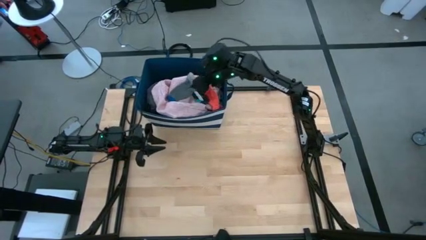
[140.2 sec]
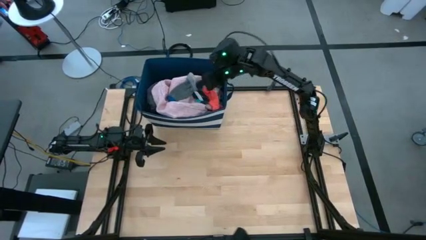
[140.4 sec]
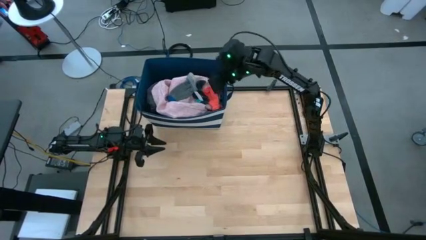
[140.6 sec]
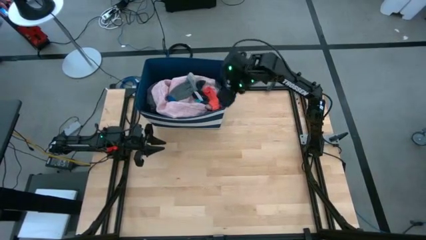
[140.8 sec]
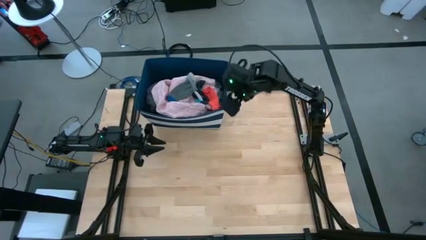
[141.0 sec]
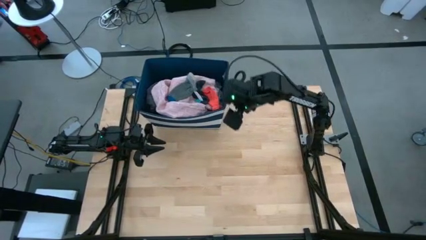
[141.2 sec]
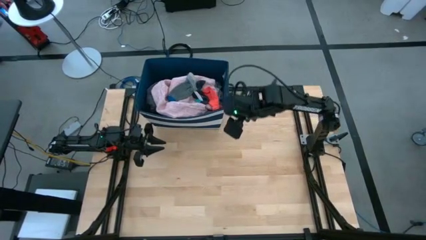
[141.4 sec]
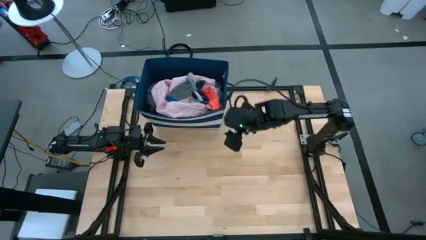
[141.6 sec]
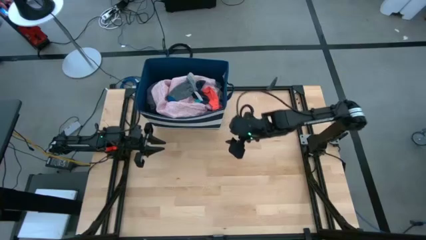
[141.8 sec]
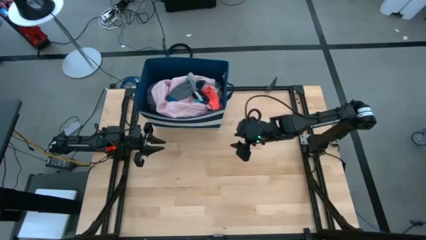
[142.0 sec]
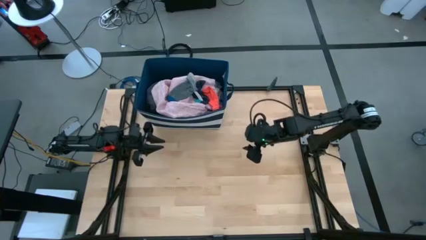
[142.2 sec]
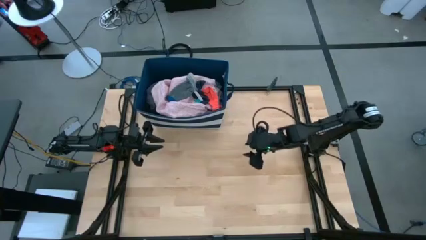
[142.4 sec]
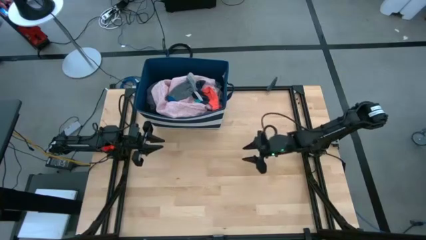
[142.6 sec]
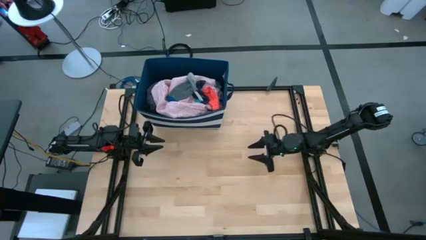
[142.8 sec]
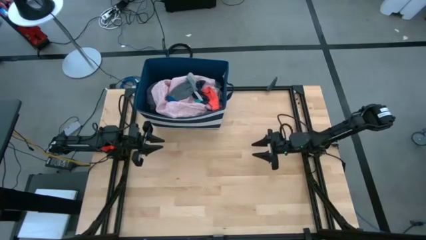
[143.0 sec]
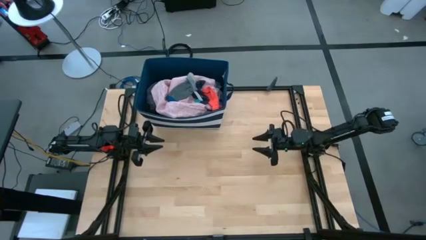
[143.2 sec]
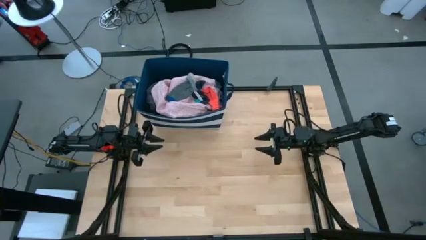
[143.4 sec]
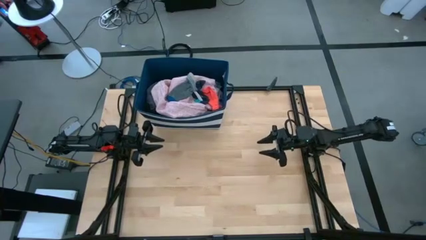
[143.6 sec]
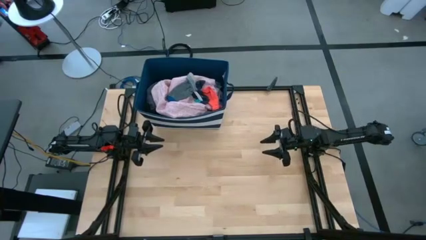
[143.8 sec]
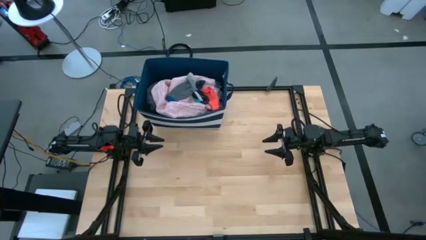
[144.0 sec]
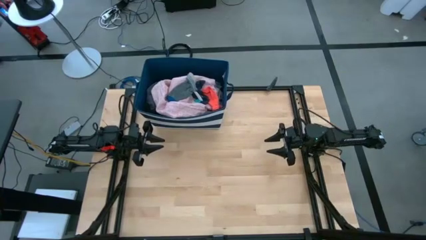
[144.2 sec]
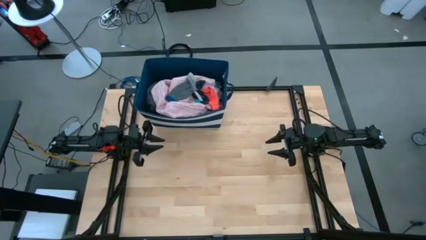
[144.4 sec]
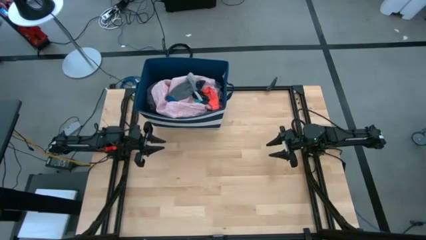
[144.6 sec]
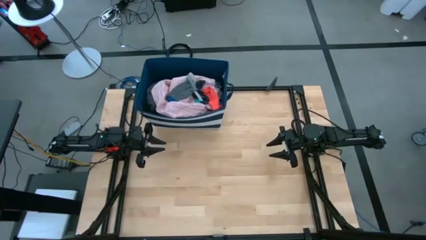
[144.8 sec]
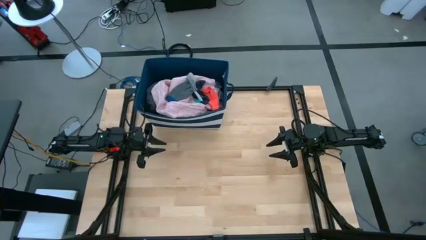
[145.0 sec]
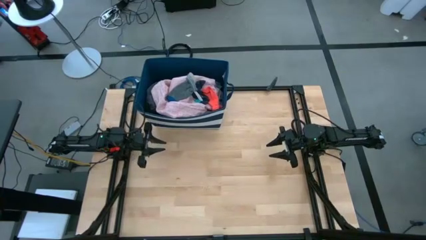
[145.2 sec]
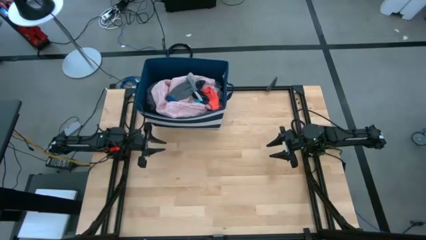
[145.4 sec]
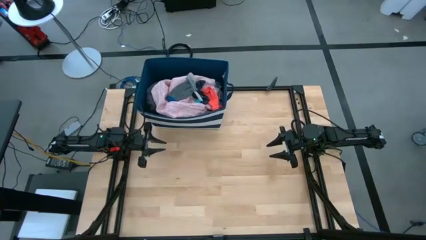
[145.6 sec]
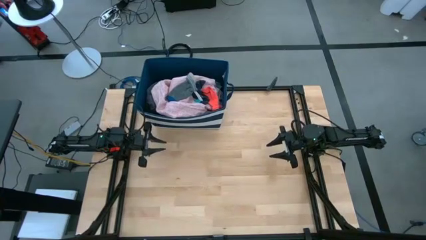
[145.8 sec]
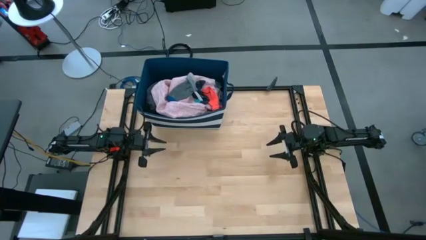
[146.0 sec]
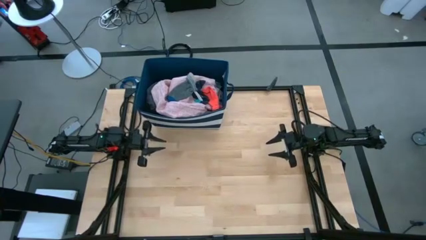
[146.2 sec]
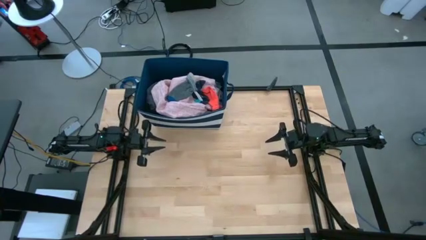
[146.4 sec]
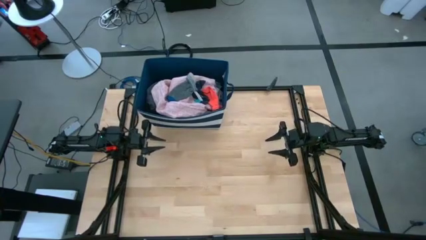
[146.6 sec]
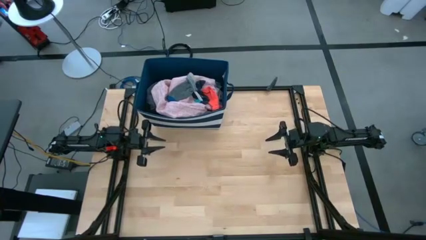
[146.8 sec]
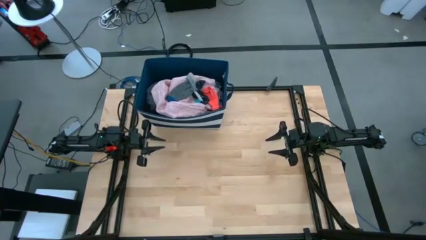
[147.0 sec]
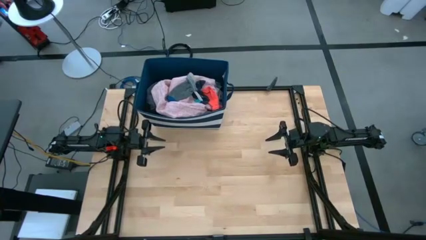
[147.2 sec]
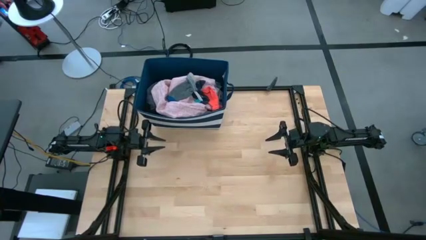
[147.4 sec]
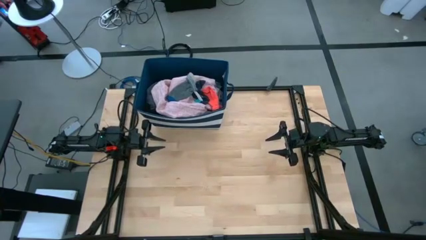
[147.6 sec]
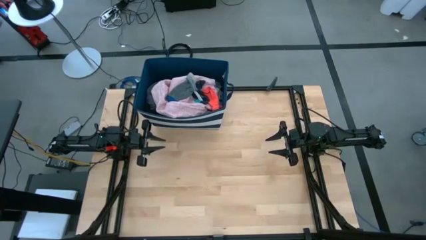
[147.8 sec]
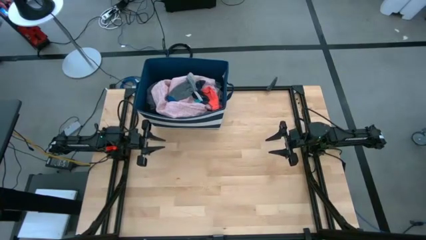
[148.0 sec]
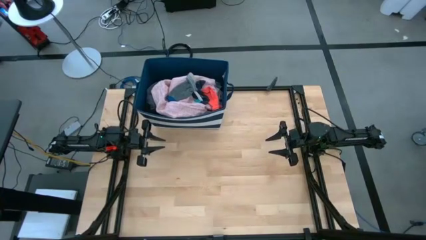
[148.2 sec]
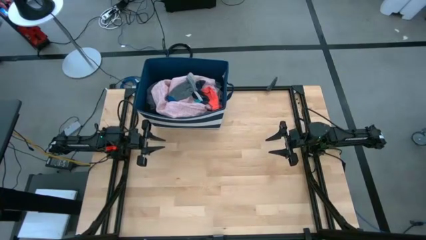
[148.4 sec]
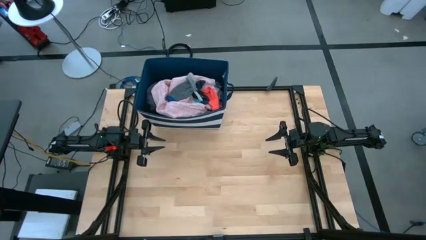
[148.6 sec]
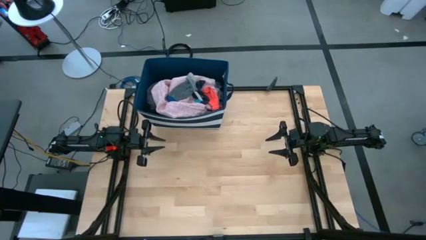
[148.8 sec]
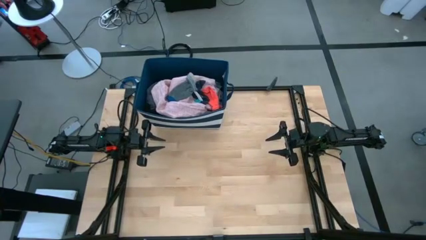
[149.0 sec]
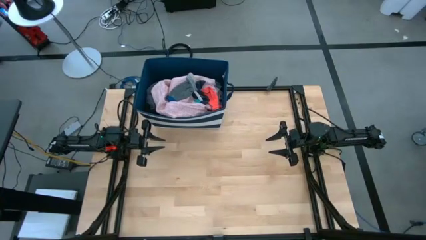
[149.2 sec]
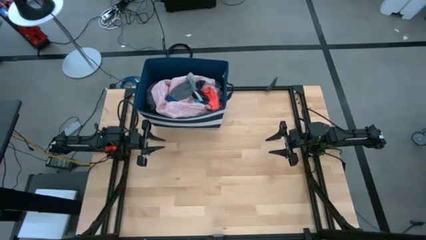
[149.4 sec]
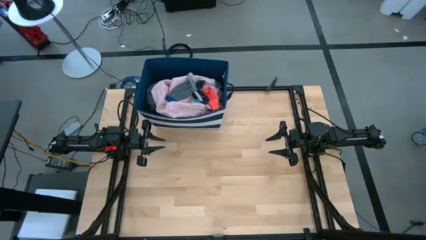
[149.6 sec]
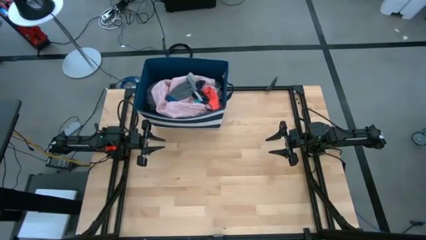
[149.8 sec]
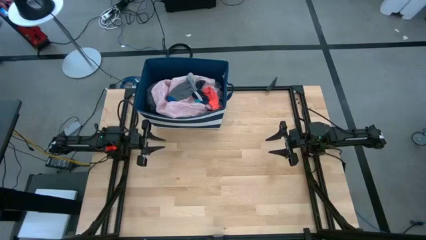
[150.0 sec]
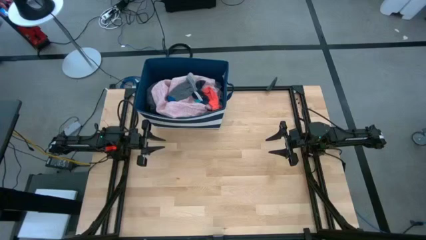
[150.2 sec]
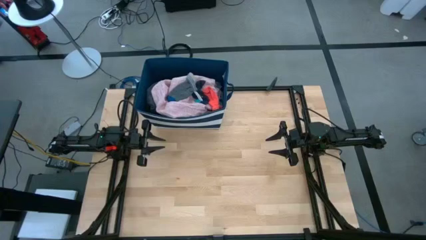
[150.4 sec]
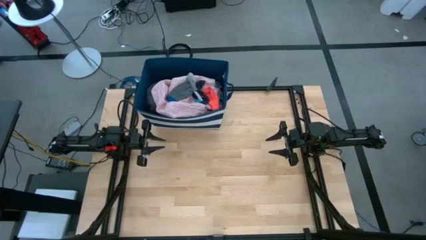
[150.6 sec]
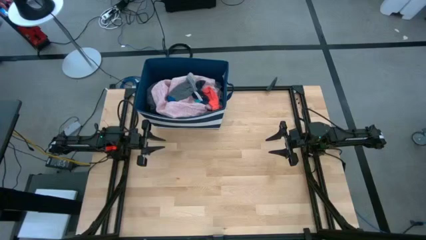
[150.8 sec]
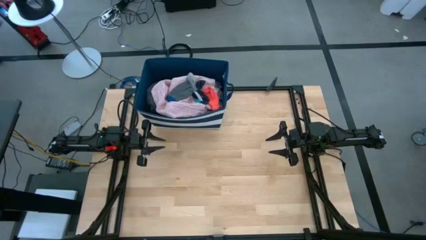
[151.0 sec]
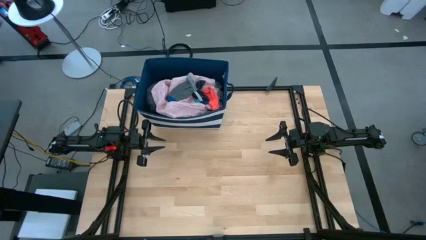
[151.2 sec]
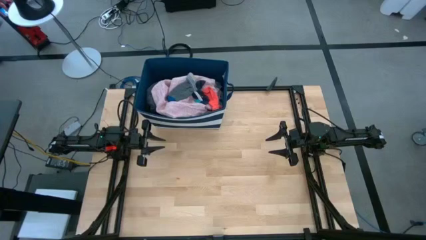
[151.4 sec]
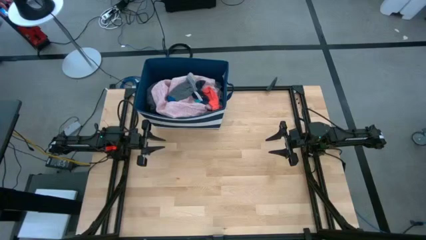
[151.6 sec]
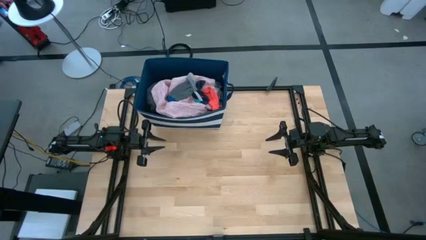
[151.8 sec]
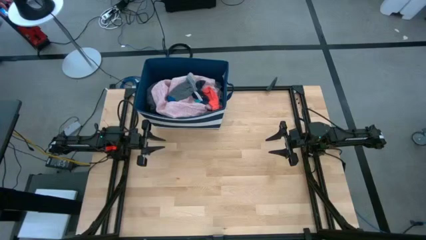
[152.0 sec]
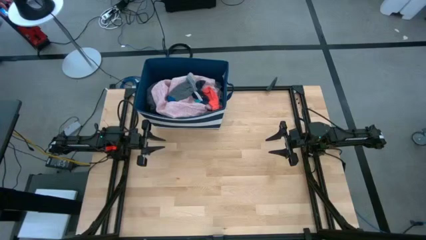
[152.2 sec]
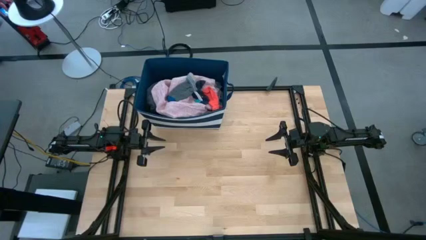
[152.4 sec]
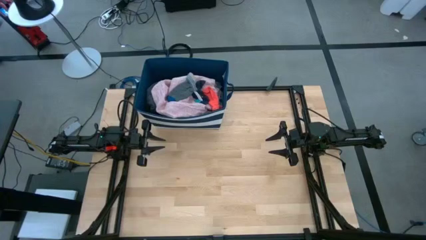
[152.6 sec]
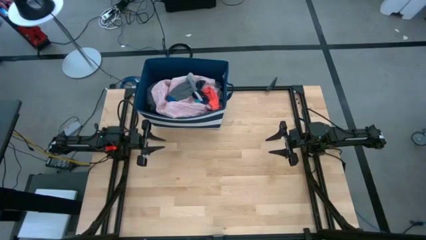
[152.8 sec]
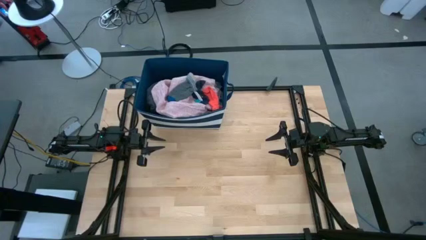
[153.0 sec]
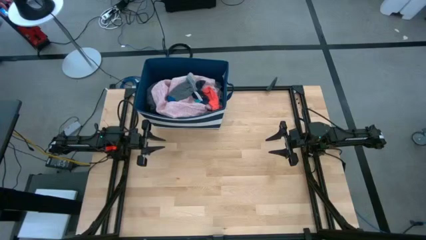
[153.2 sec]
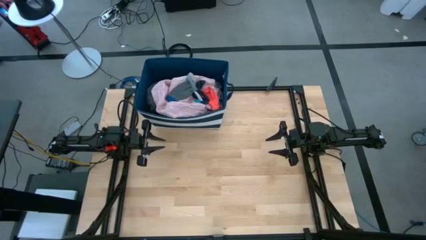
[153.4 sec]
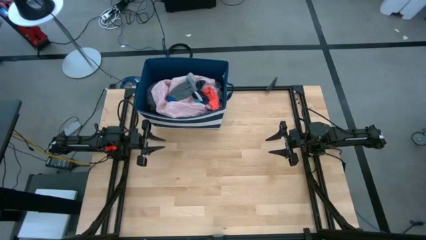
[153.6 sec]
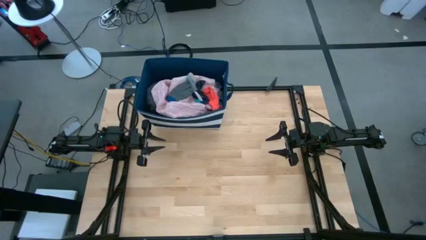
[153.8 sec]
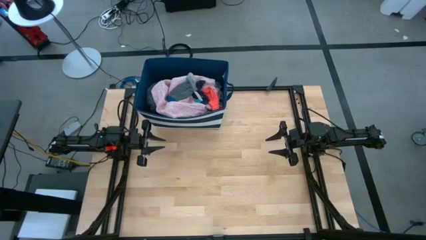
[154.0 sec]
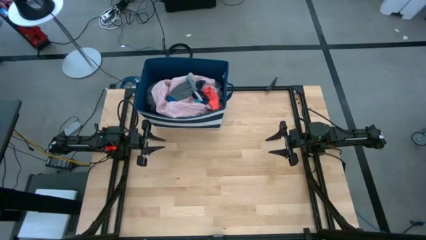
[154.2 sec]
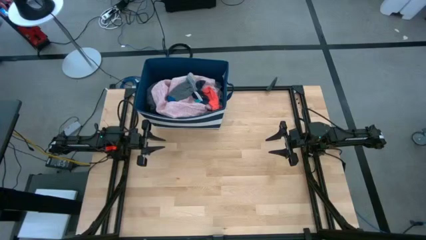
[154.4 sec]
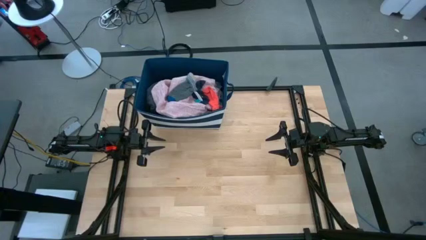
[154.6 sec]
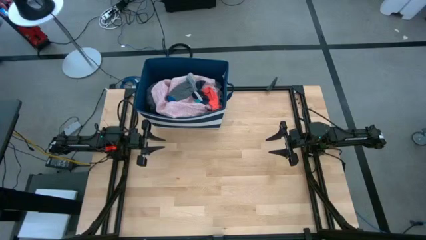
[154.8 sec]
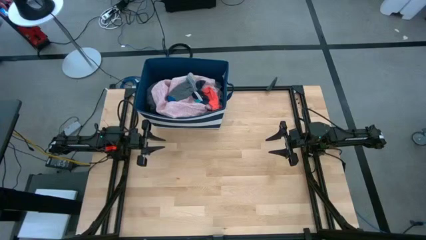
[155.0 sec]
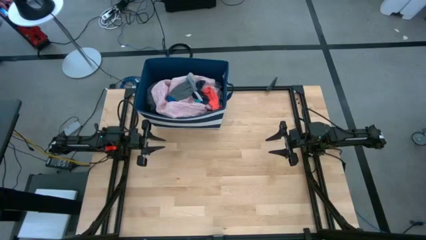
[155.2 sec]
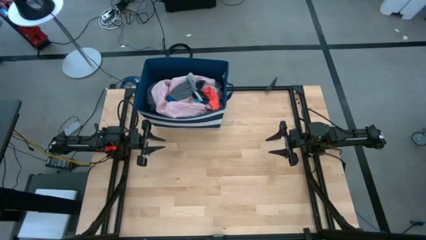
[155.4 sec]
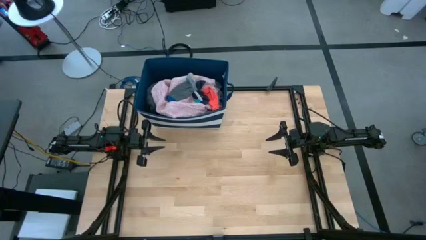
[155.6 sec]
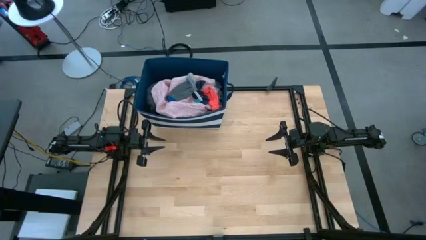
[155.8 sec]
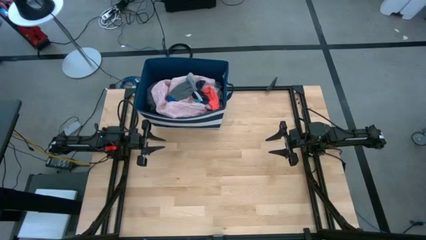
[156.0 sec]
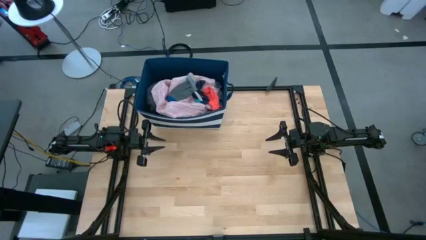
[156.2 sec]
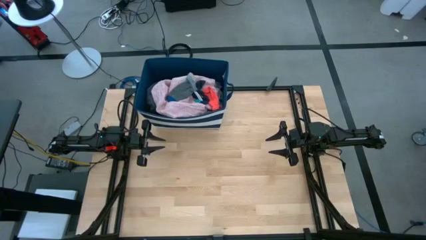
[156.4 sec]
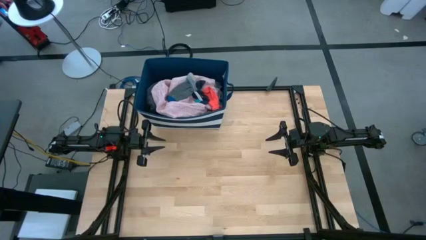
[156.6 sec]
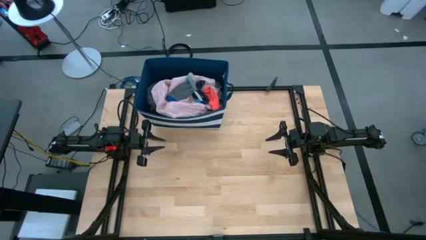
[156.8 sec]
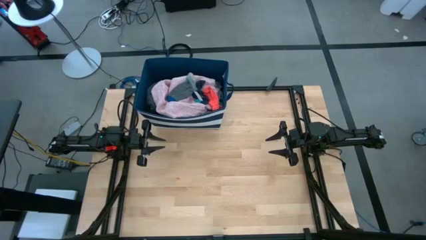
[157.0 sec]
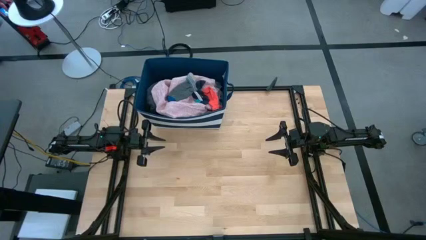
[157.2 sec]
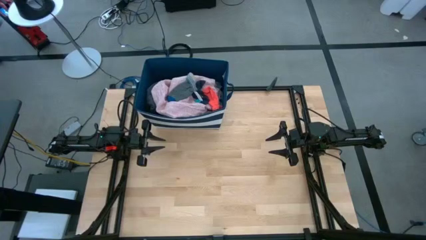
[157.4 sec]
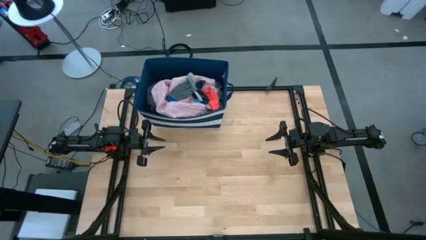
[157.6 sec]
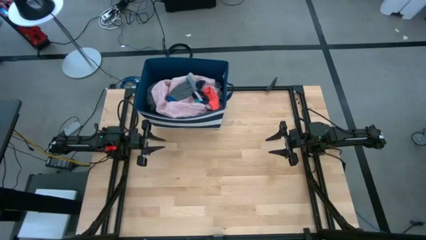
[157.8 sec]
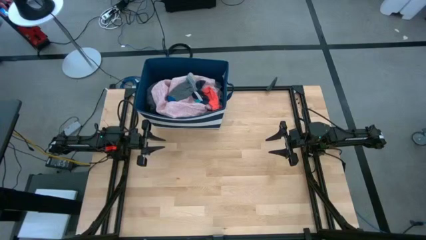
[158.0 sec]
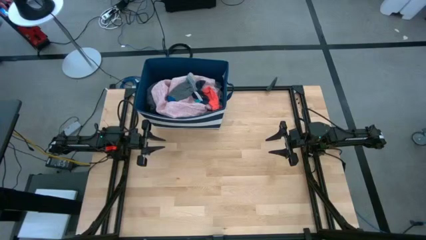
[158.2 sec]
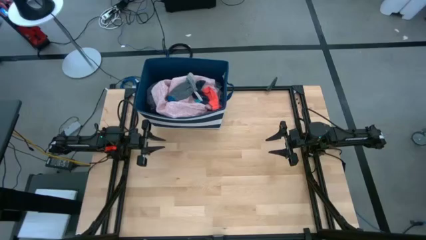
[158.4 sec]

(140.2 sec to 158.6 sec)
Task: Sort clothes
Return to Home Position
